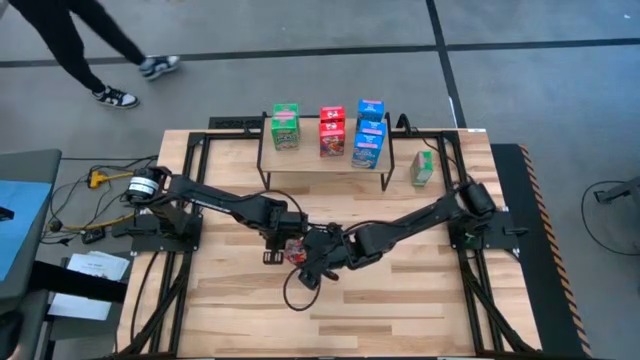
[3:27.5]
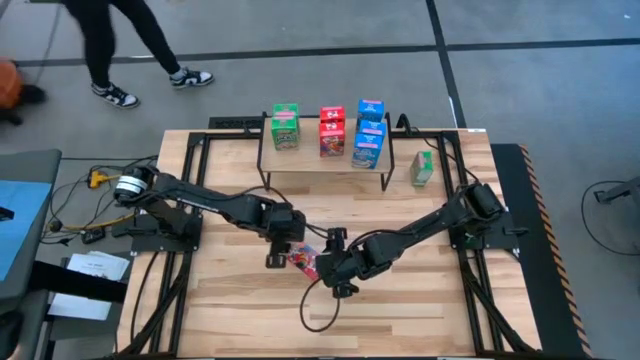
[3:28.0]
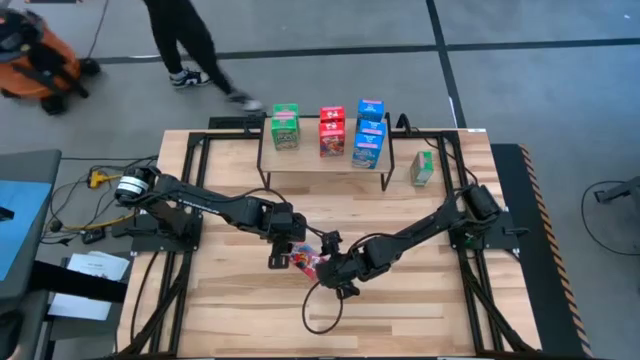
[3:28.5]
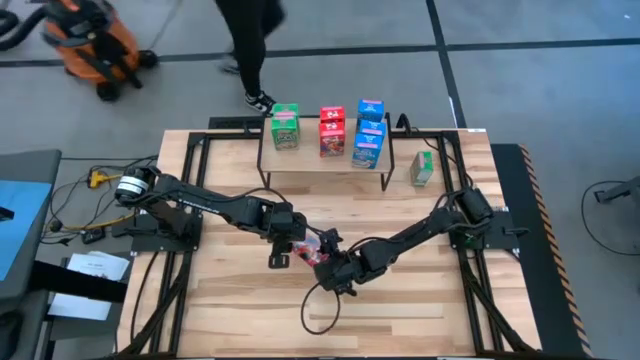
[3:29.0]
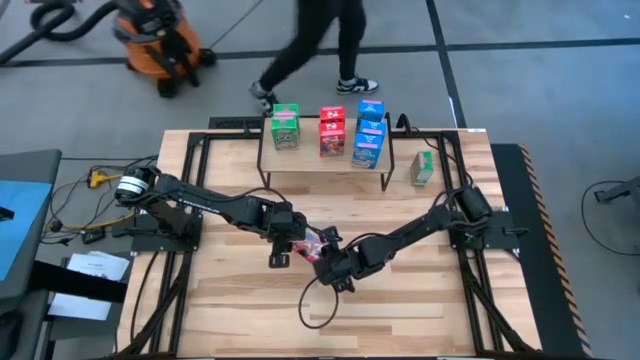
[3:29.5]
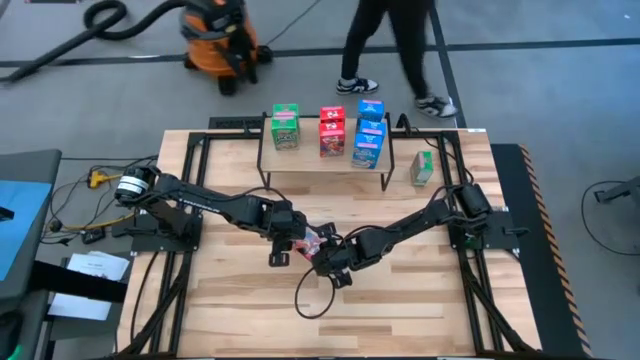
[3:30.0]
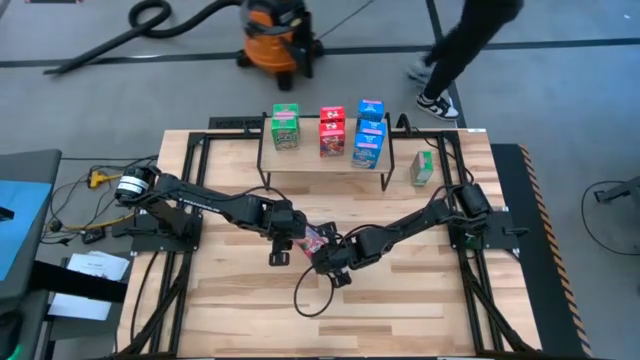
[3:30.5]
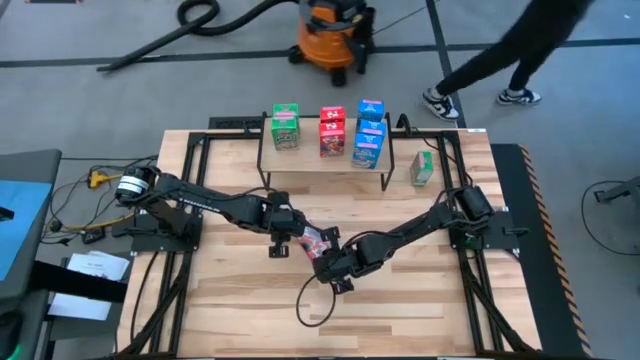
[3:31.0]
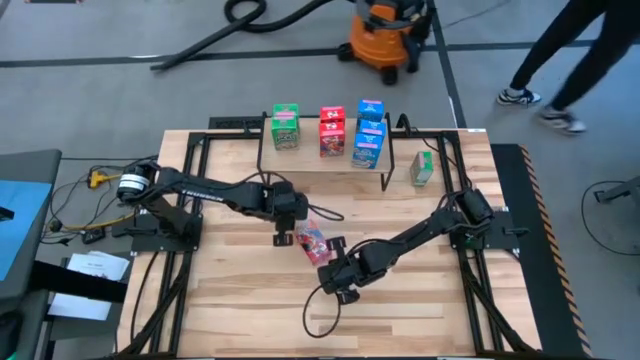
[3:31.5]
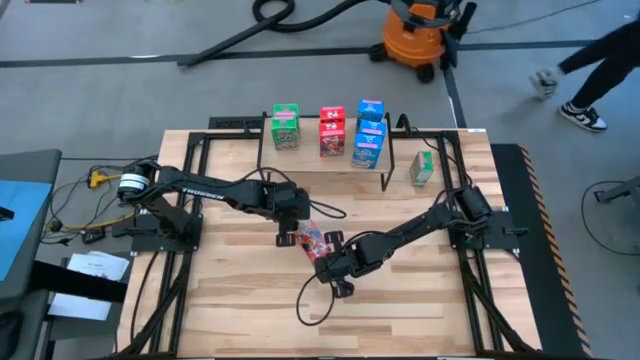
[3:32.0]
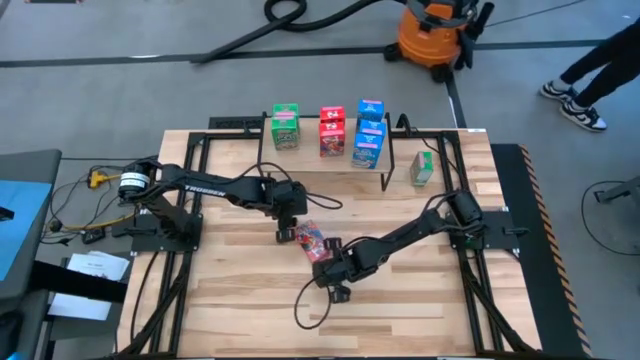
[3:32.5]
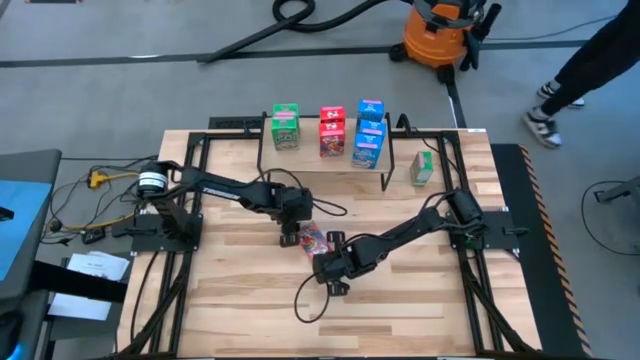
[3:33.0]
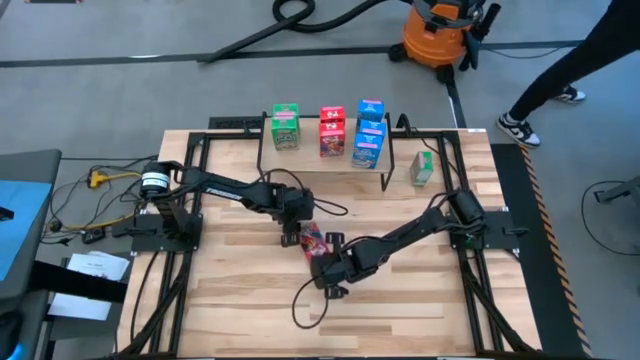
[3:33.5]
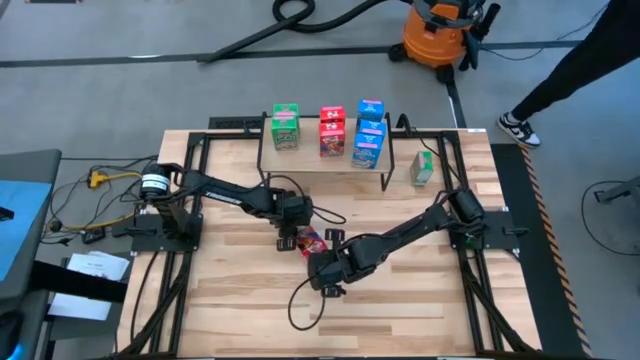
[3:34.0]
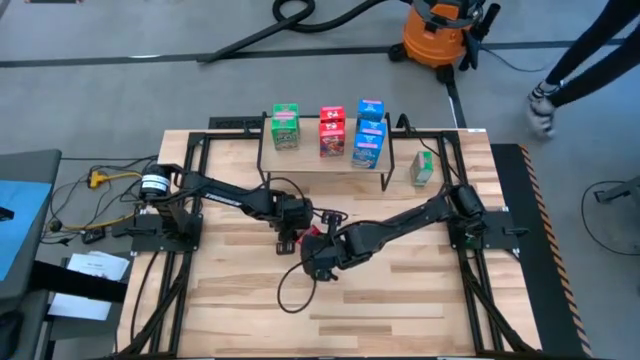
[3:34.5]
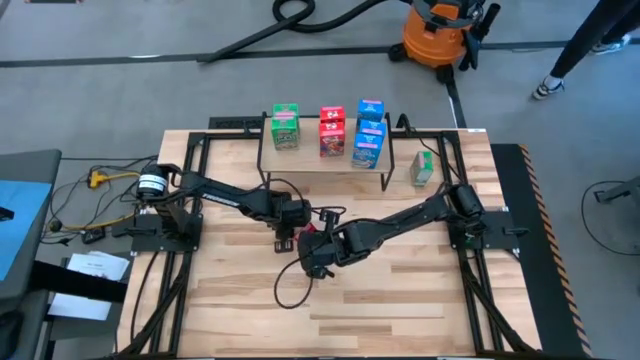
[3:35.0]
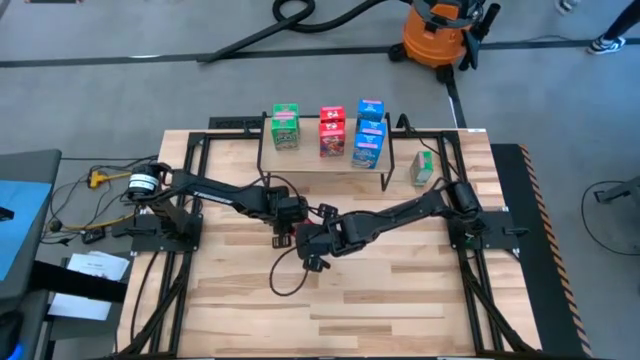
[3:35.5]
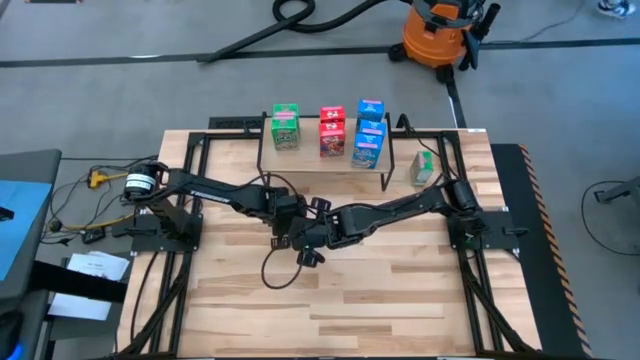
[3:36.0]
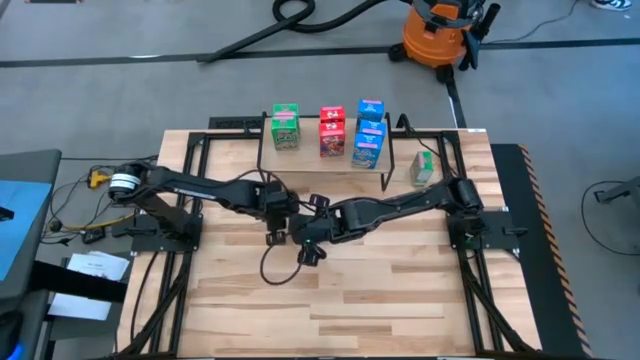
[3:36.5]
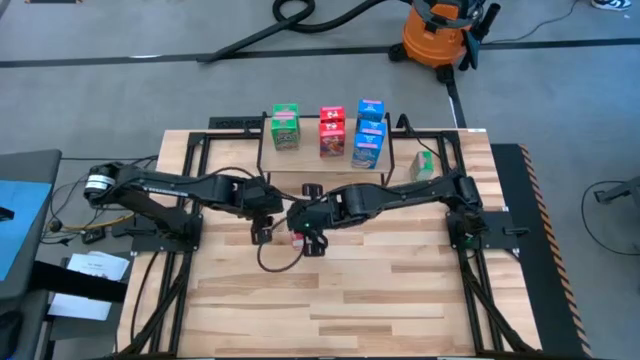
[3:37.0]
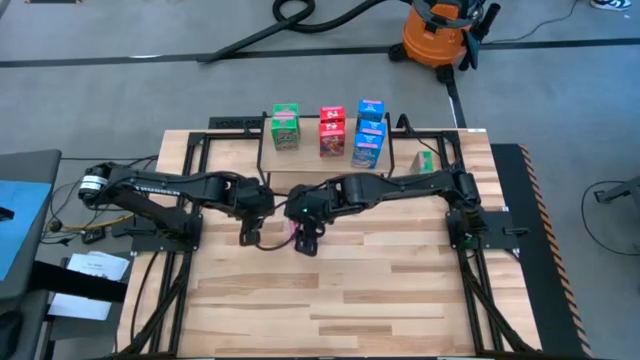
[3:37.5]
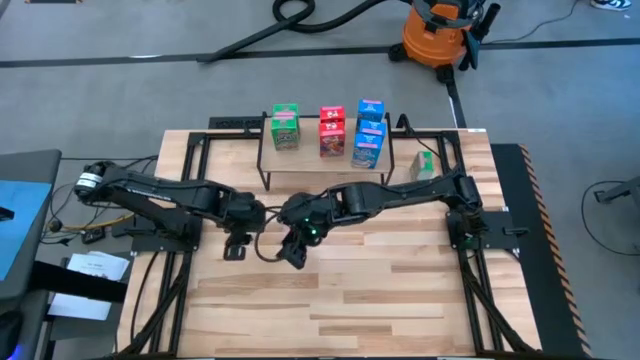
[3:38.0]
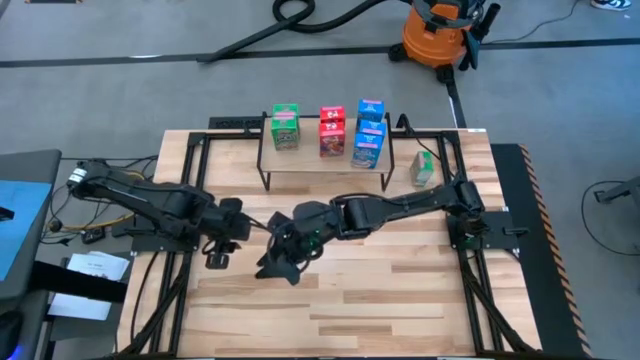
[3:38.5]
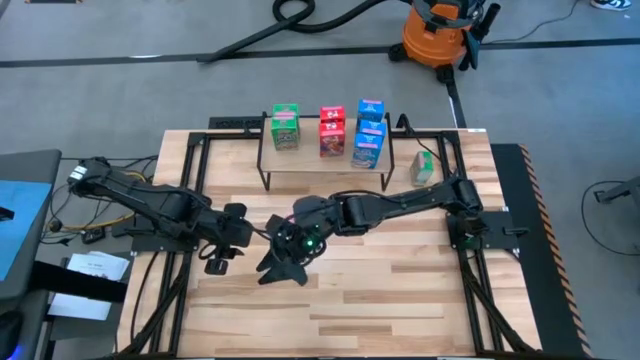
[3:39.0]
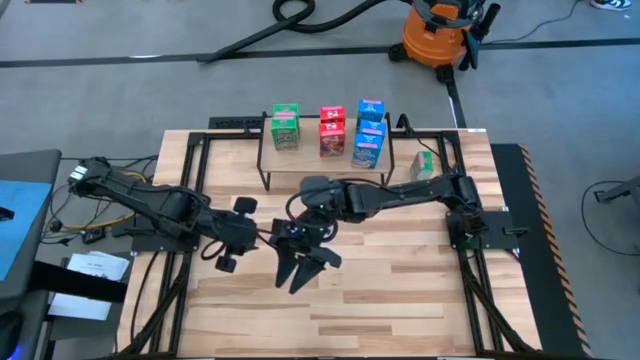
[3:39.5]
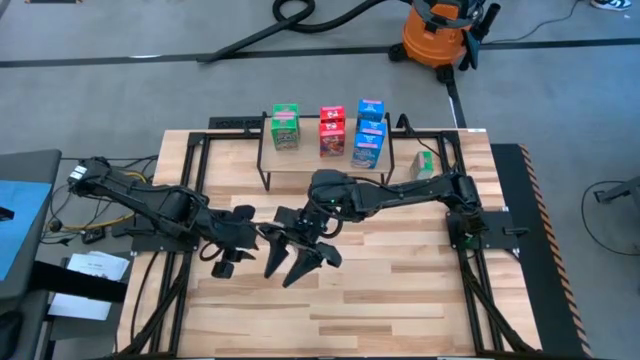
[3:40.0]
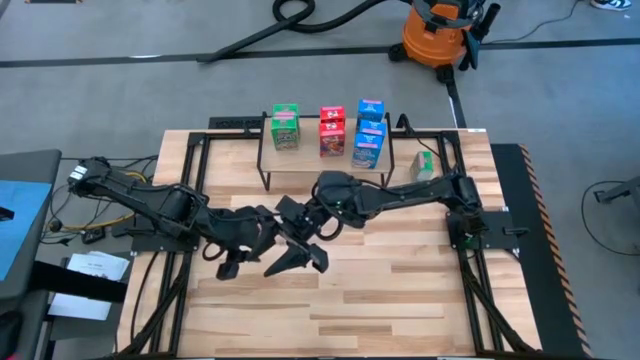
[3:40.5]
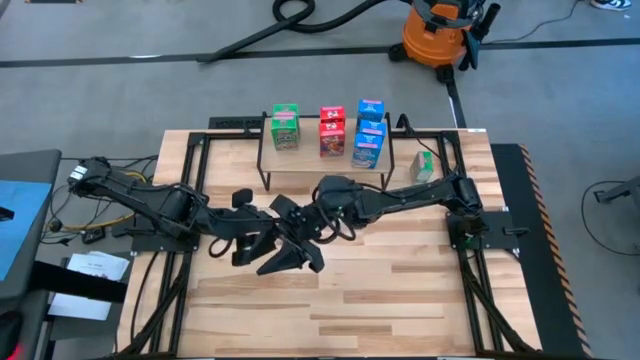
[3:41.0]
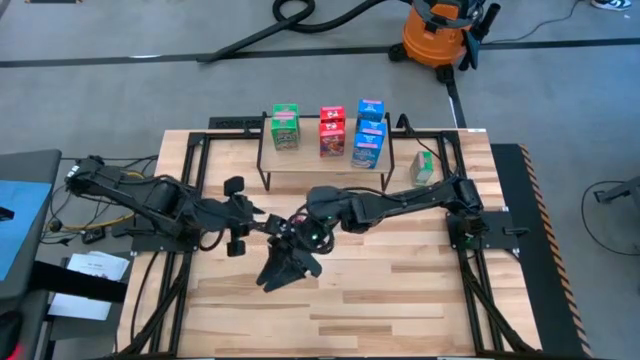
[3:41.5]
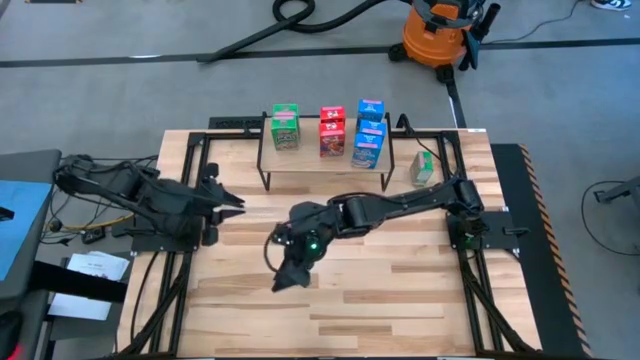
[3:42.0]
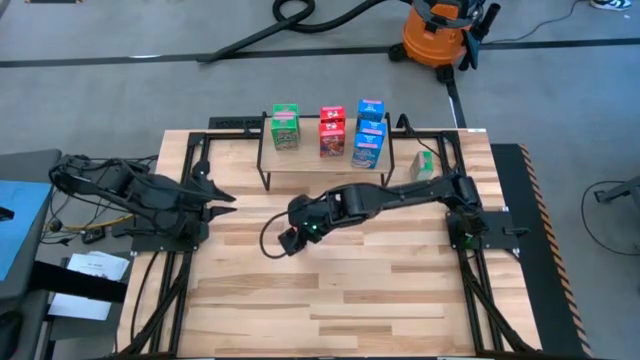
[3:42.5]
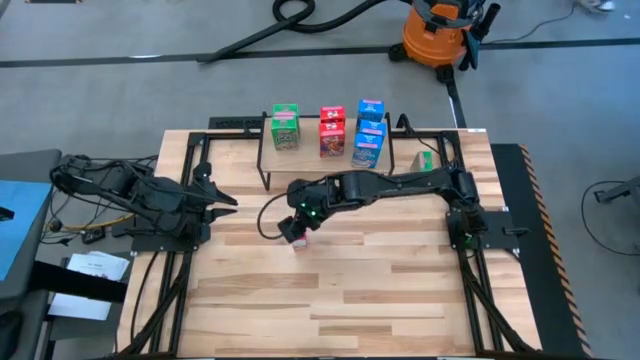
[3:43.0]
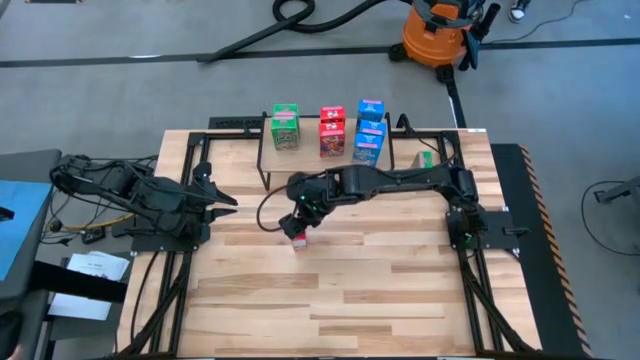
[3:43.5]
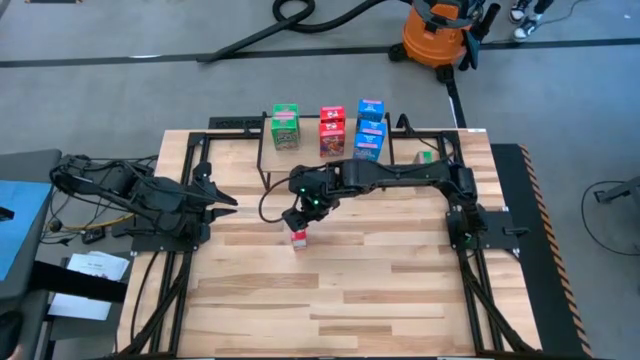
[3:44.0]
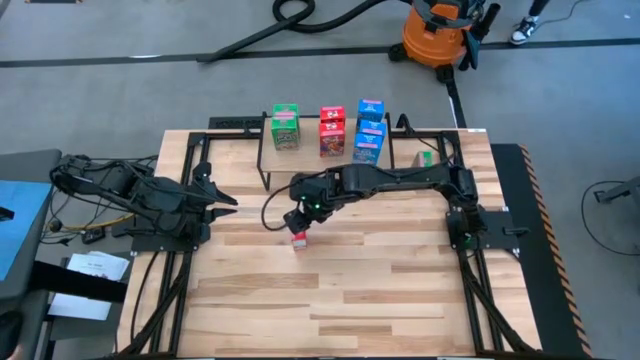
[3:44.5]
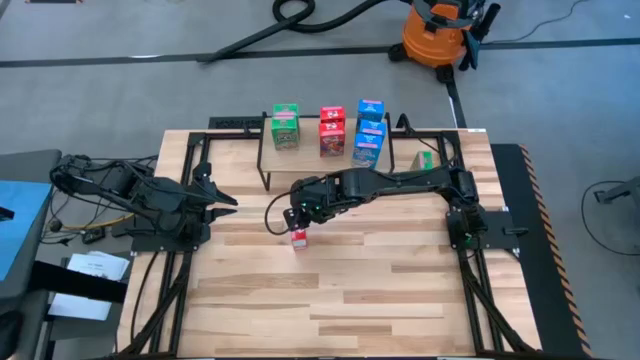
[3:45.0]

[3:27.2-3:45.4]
Task: Stack cereal on shelf
Put the red cereal box on the shelf aligned with the other red cereal box
